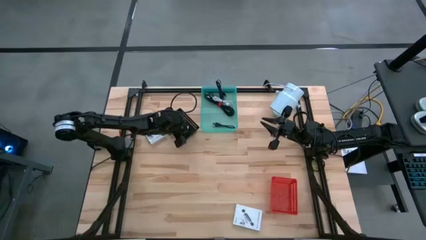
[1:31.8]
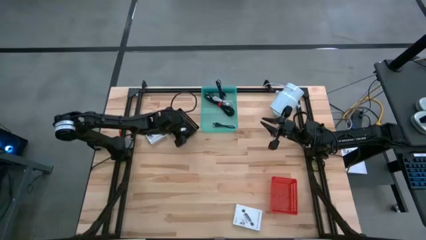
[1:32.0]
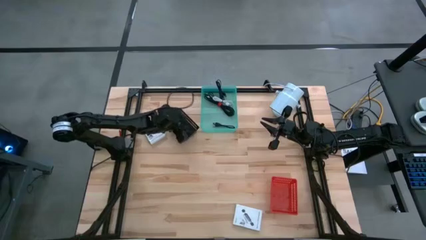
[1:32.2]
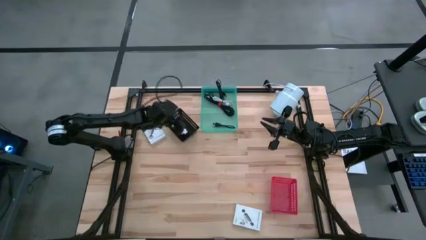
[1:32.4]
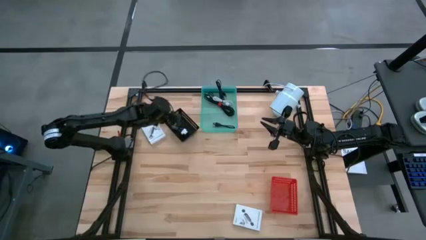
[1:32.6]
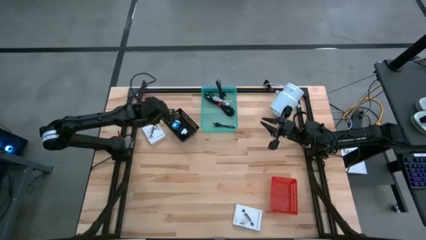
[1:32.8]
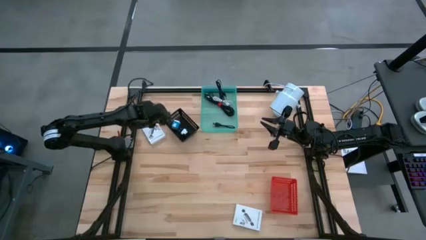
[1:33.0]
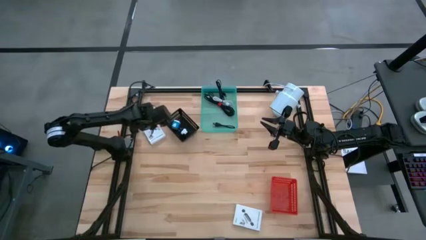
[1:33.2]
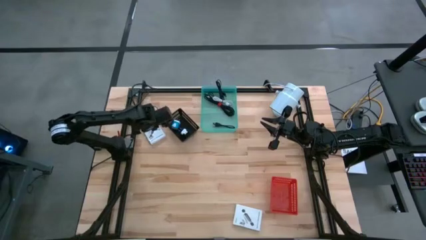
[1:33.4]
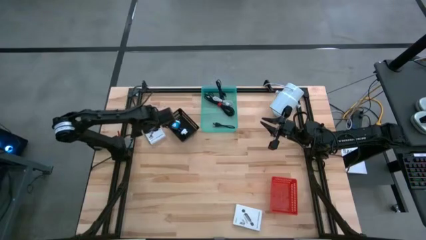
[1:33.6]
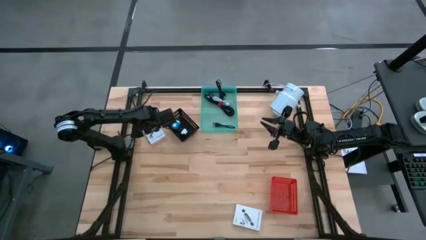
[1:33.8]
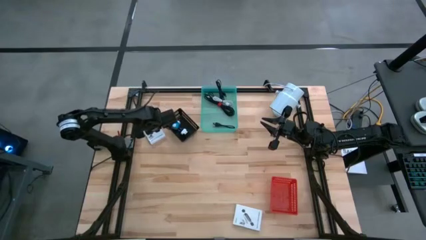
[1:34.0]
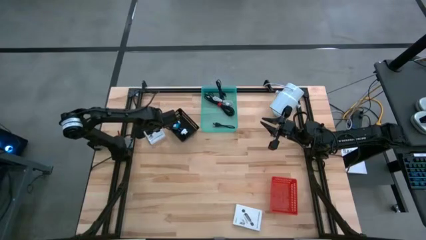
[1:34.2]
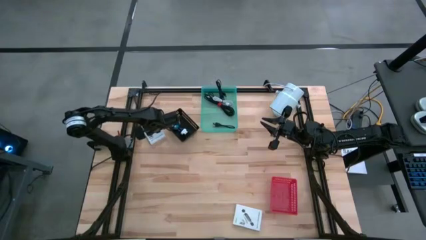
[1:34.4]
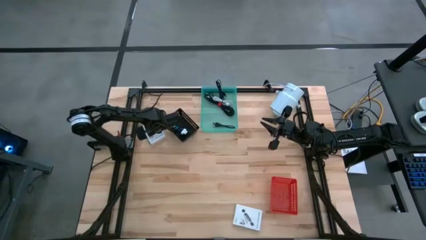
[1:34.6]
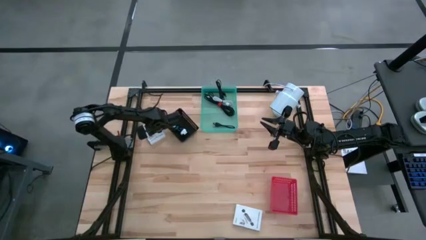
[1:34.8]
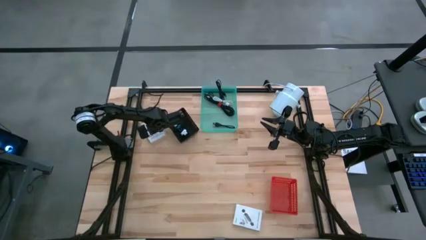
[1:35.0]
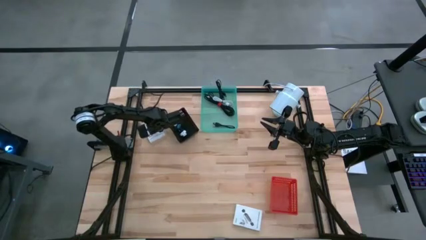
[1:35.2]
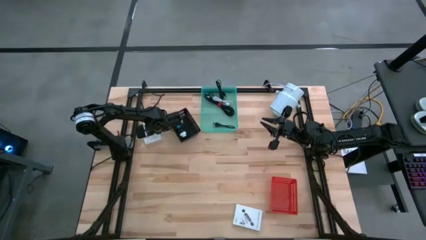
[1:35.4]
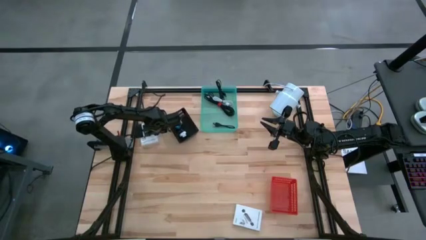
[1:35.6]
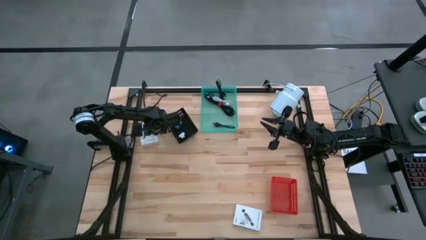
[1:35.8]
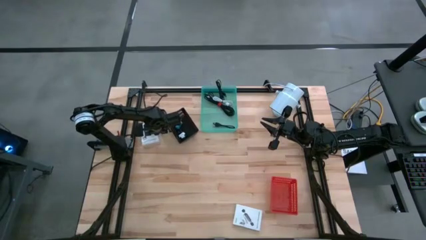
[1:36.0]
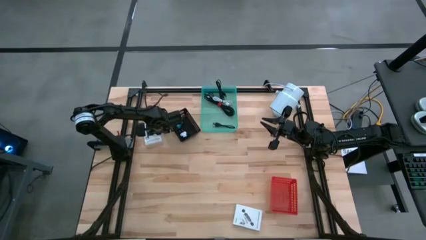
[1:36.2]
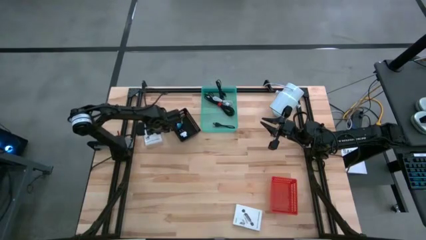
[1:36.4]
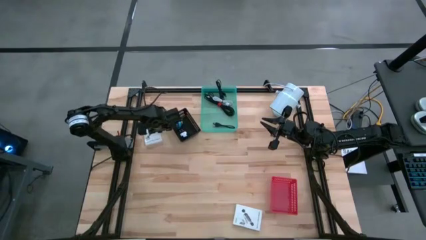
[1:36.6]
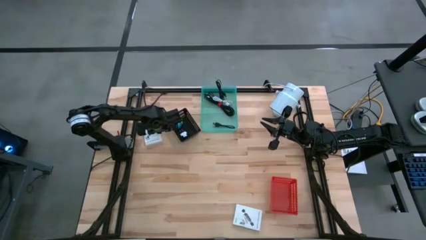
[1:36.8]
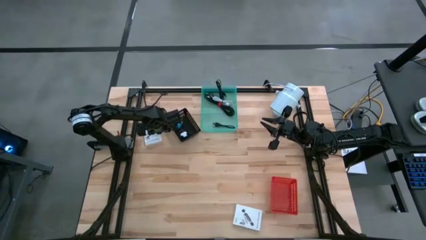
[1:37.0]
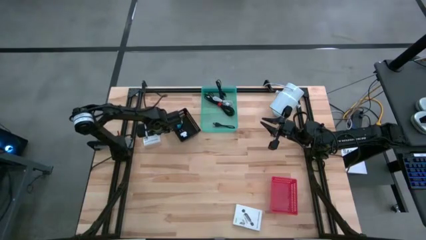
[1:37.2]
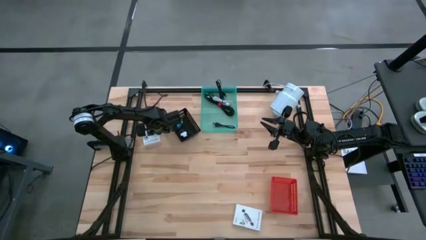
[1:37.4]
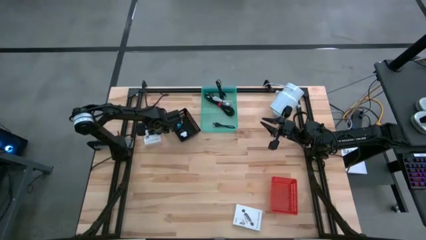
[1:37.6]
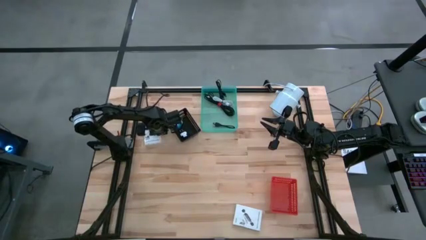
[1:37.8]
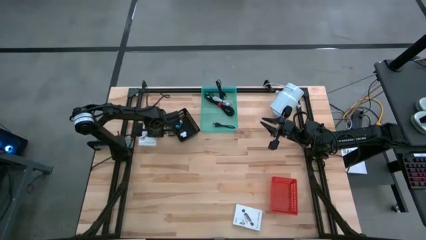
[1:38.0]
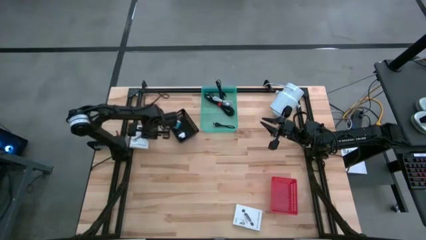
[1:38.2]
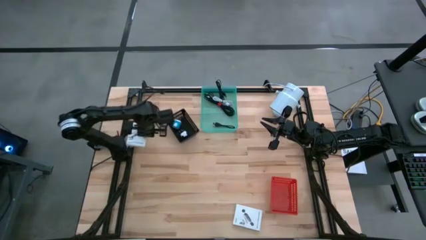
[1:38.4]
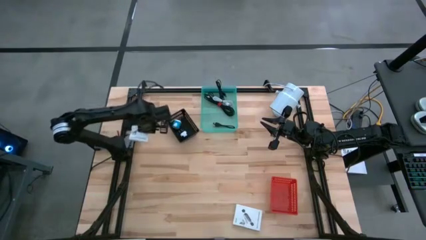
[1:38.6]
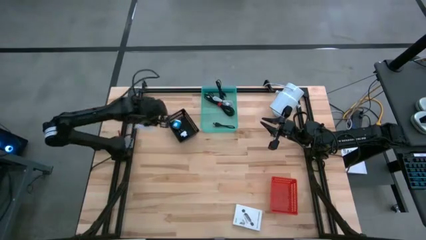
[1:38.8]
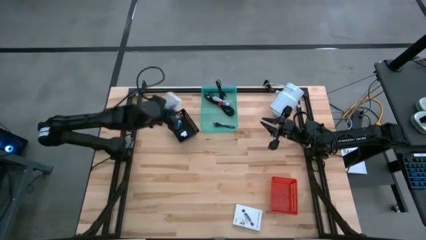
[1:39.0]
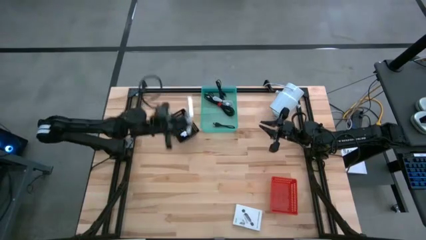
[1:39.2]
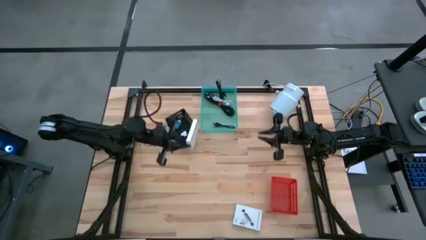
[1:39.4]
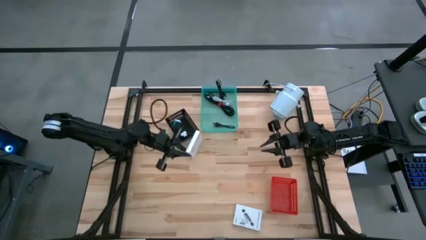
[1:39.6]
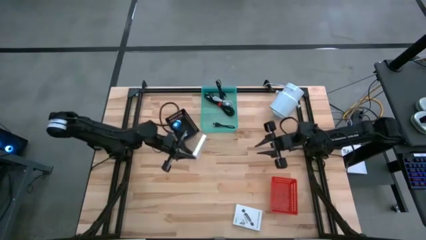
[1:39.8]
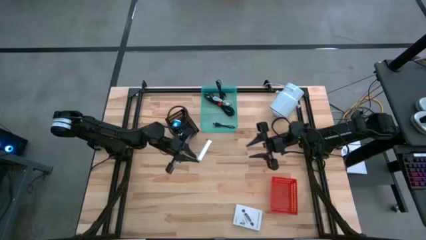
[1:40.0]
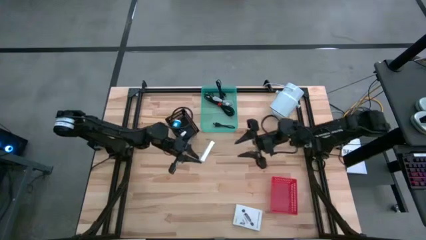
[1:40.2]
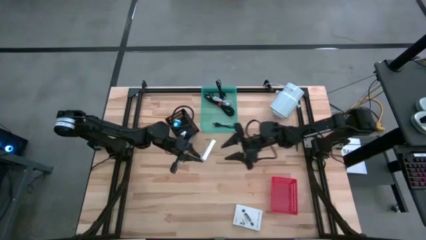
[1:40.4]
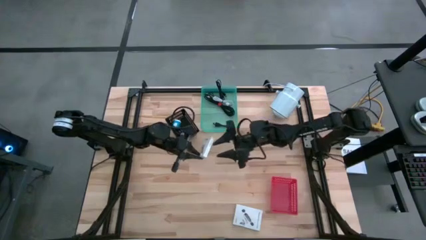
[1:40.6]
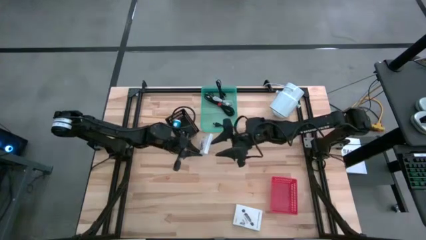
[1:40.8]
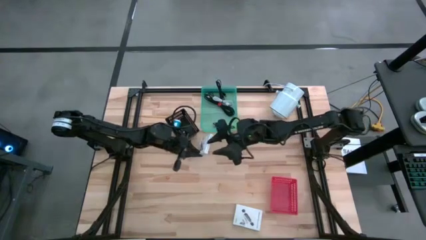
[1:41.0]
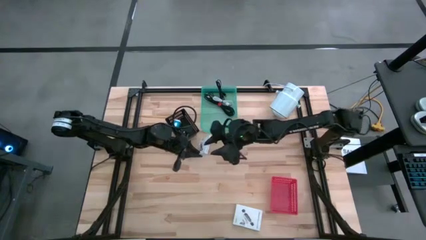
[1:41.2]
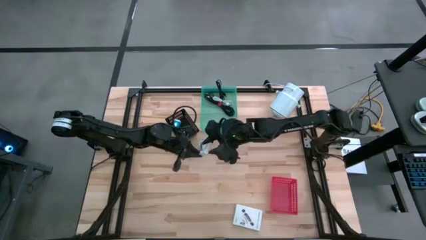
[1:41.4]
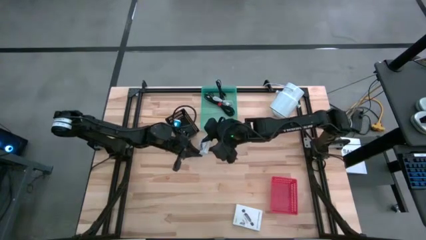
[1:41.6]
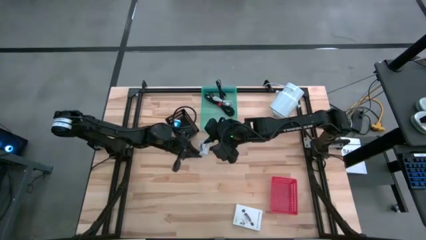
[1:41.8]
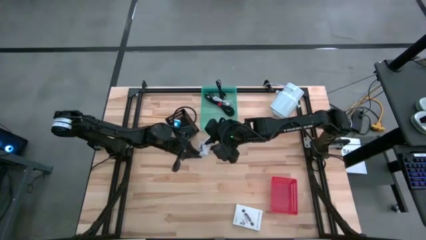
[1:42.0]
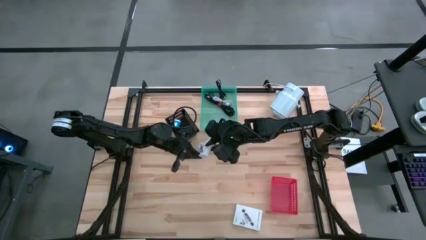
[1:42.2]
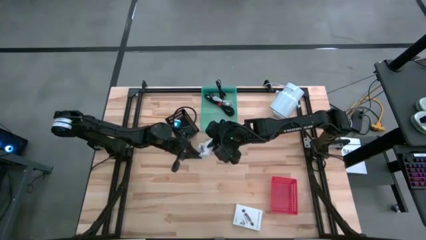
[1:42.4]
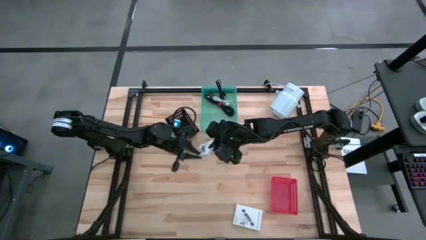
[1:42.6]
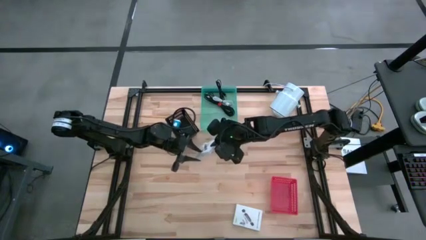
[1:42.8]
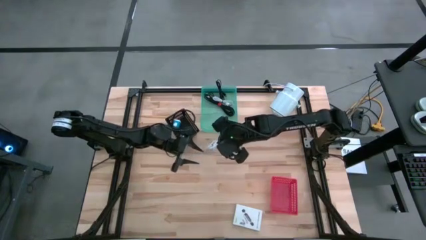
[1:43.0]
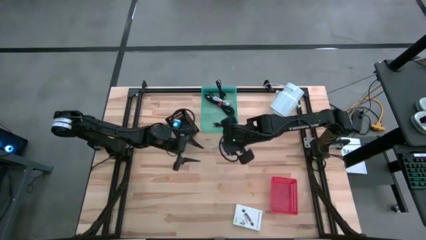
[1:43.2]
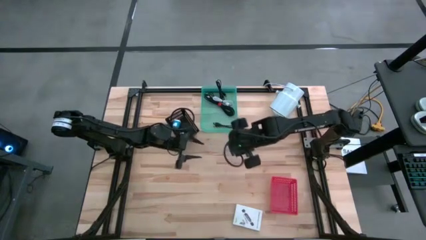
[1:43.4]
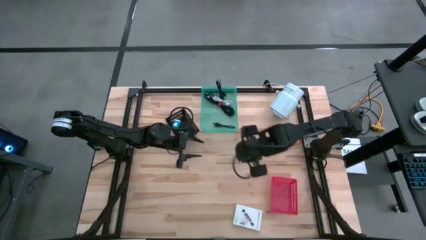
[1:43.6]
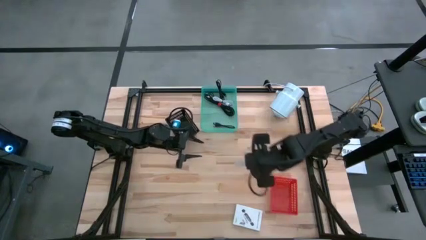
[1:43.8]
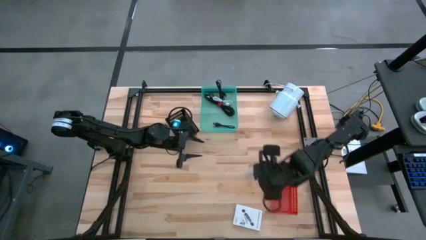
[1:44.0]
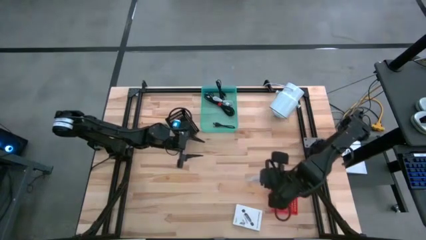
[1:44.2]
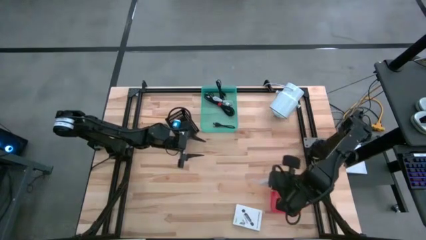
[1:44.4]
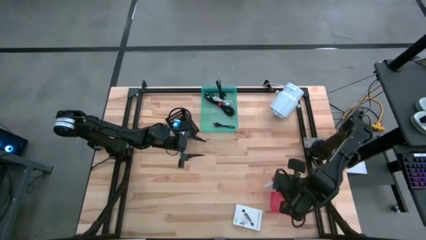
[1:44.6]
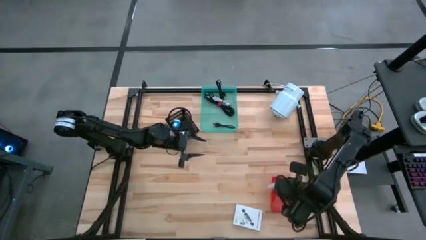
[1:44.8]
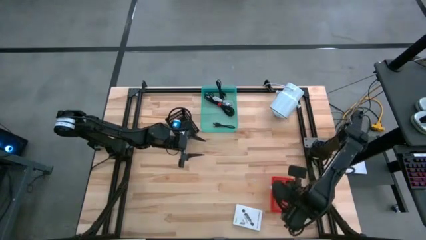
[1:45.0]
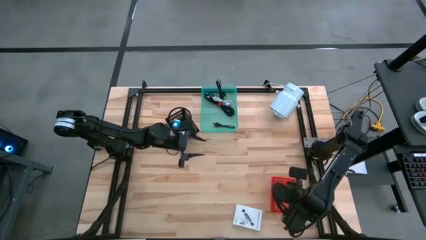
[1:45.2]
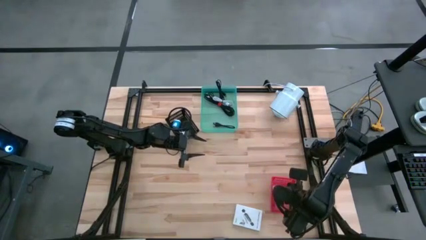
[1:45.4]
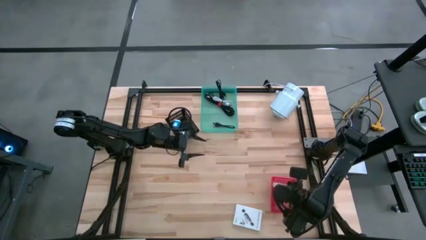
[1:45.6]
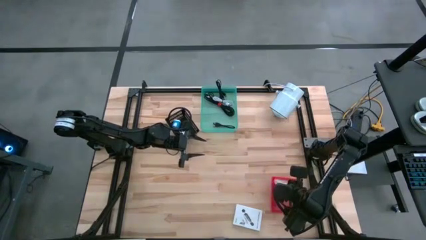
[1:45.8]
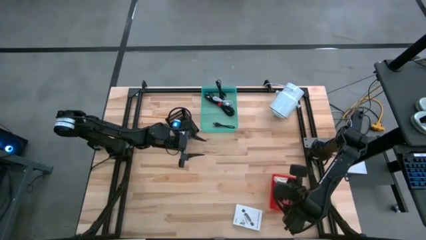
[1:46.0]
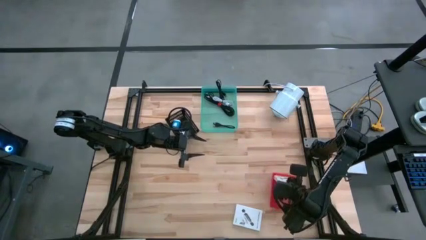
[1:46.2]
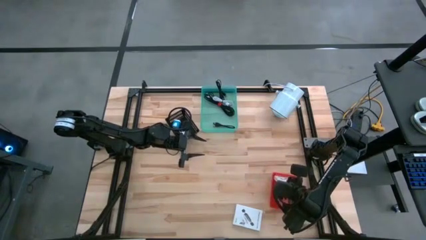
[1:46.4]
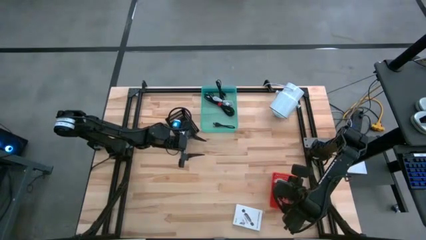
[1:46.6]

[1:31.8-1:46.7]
Task: Pick and place items into bin
Put the top white card reader box into the red bin
